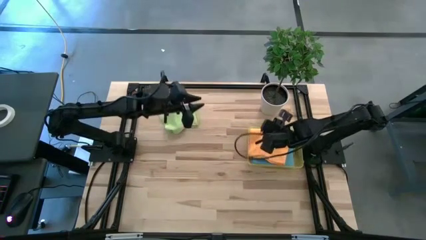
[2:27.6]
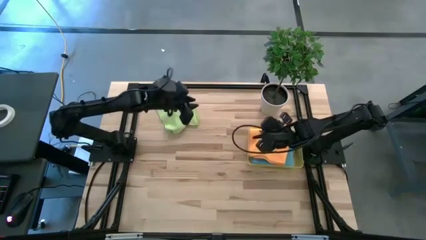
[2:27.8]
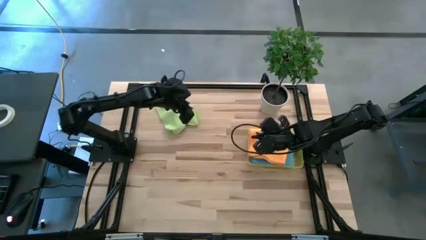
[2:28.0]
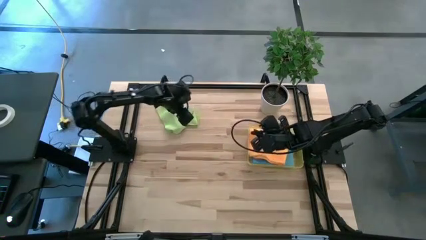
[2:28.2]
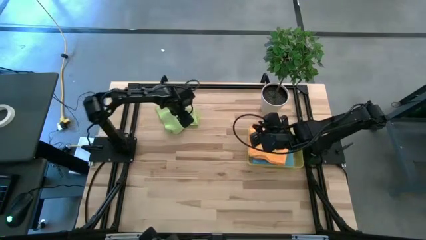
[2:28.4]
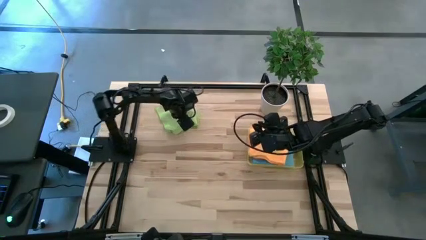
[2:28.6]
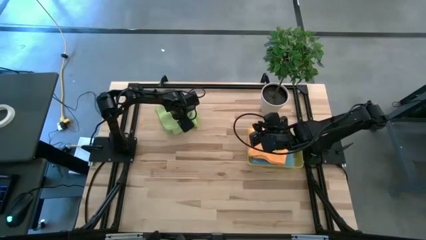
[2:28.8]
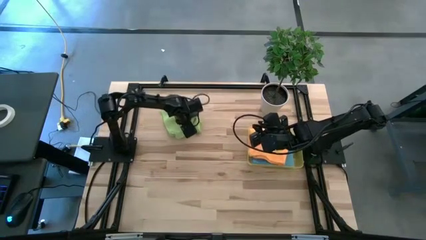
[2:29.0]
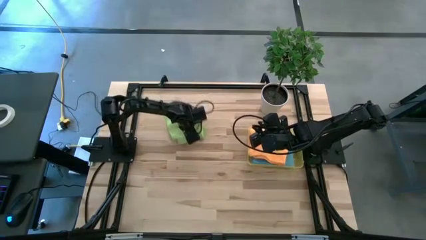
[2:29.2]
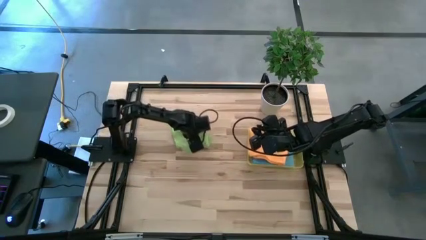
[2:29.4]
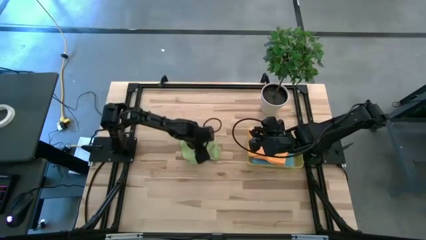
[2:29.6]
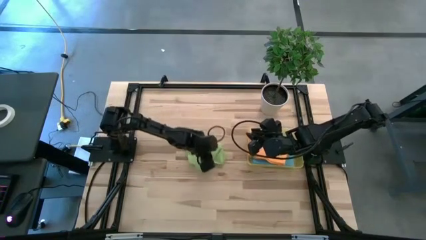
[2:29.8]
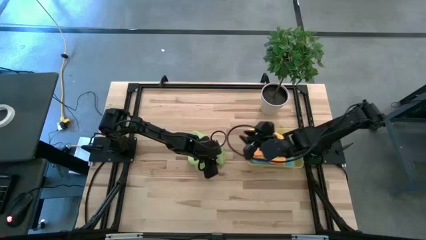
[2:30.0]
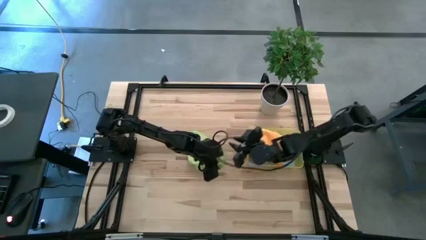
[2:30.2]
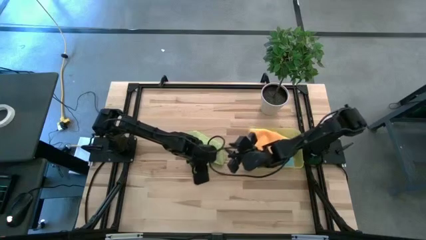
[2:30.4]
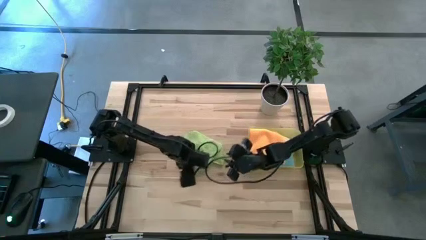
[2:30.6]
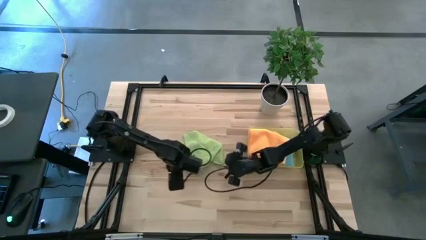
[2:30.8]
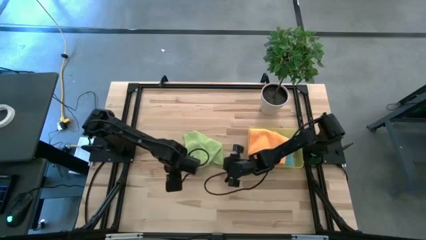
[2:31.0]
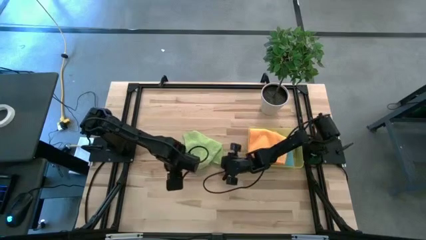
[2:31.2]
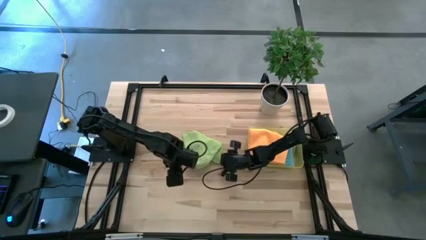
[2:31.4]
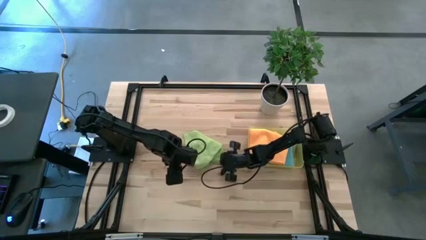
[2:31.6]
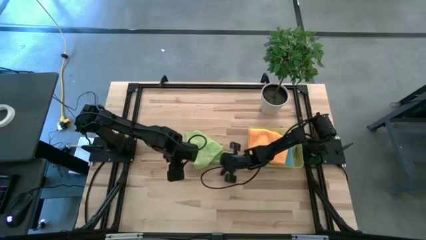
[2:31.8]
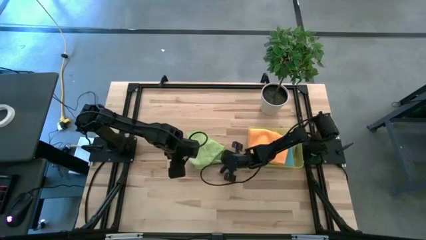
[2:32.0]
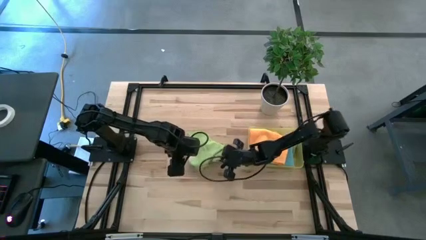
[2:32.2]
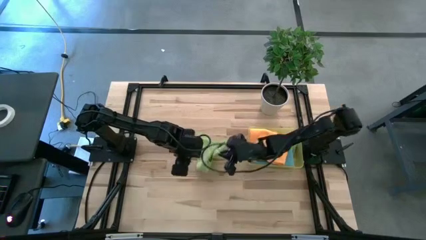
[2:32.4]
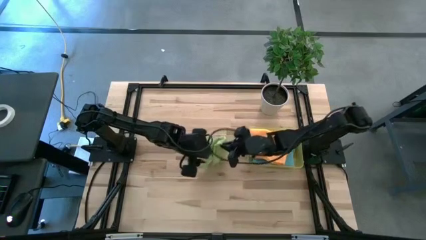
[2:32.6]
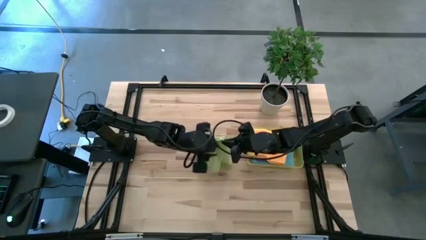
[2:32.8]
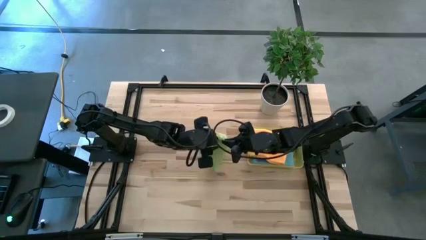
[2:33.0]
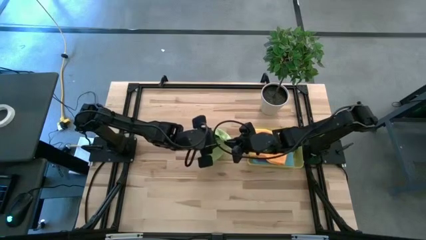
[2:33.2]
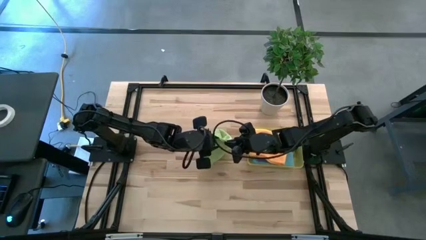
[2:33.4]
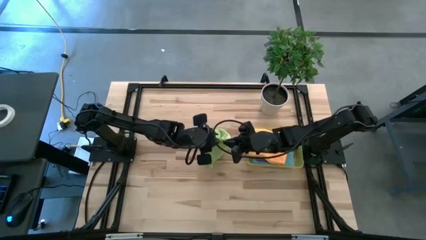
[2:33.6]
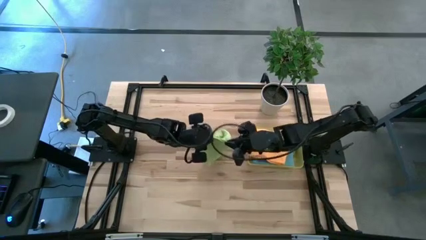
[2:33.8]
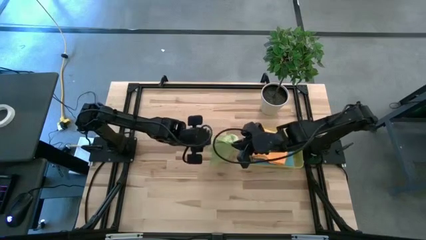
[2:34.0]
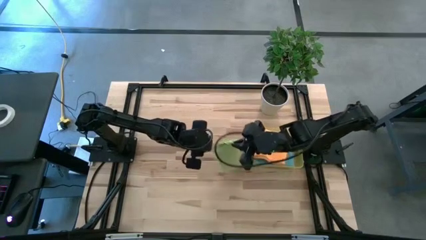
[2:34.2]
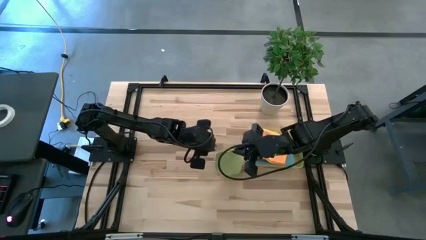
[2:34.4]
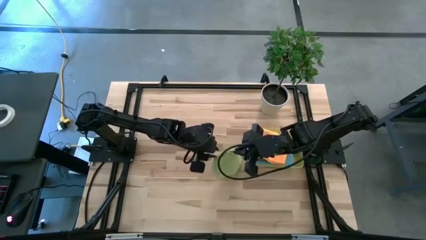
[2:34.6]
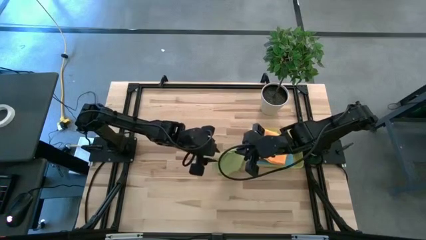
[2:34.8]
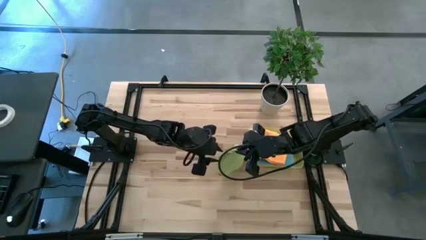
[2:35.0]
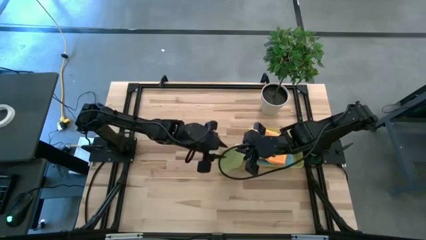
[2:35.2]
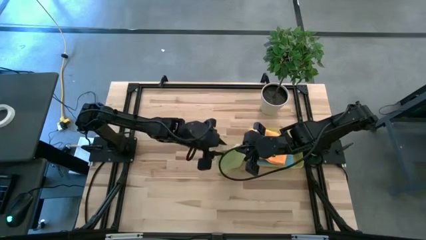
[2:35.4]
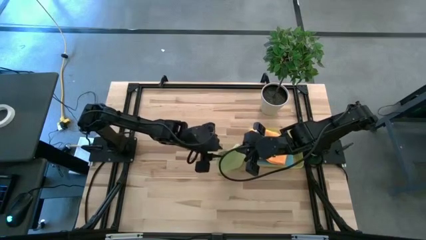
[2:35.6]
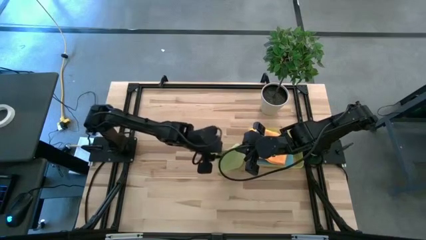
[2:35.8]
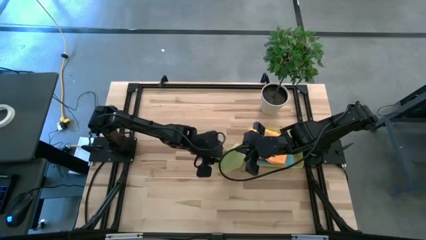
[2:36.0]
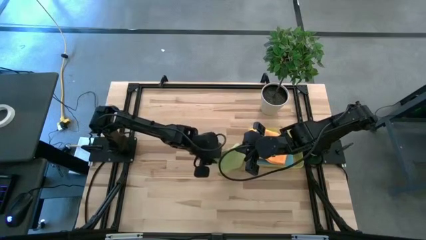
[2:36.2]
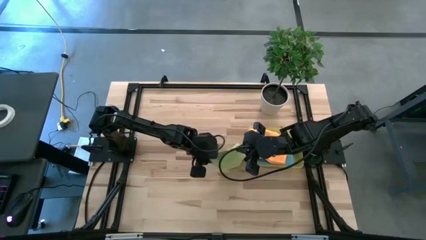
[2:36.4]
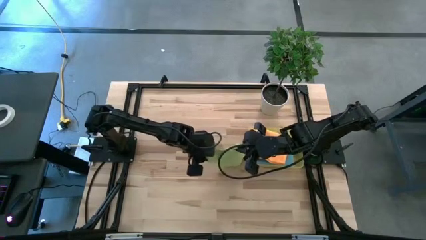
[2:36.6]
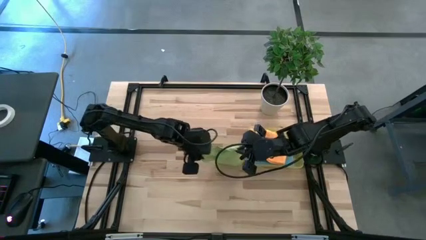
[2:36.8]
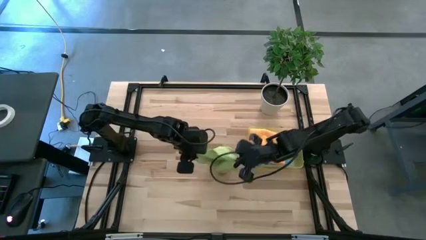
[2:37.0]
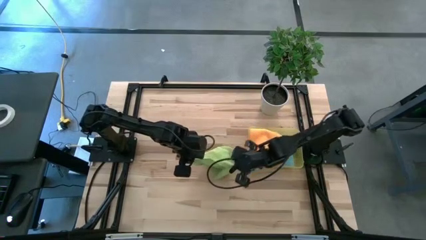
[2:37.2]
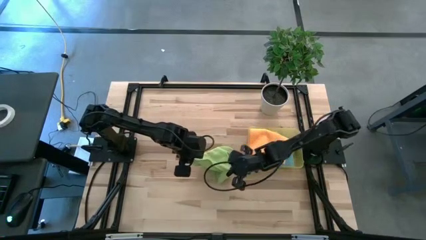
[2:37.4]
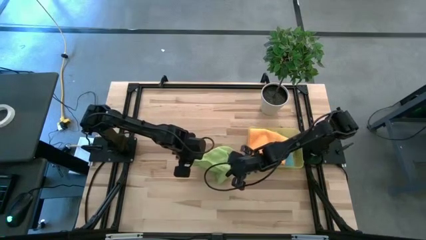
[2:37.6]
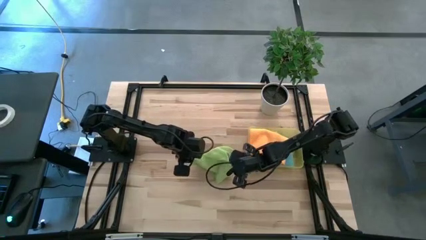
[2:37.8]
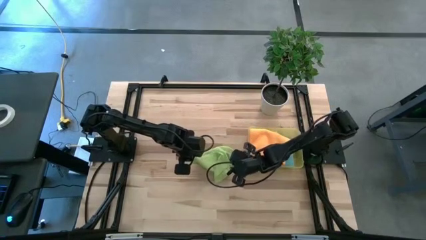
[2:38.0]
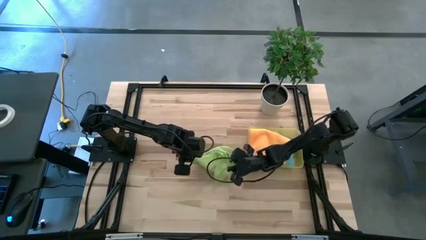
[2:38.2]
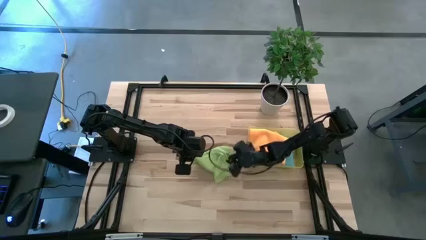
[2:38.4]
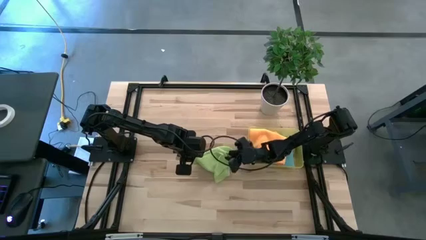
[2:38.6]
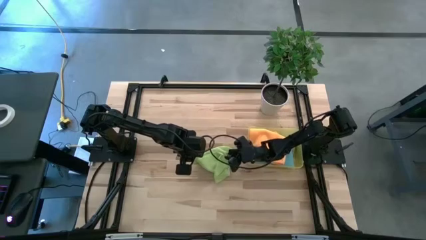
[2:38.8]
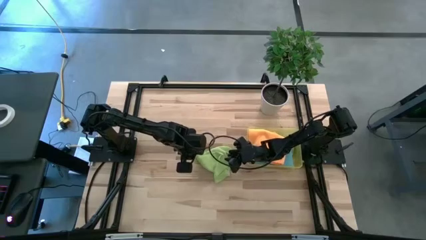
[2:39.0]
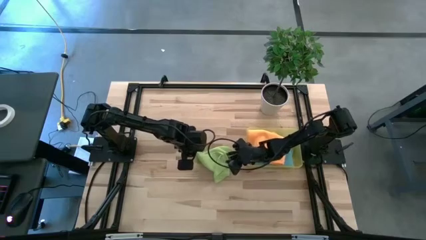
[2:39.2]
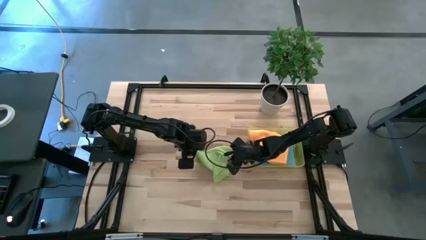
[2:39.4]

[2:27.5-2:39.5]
Task: Fold microfiber towels
Fold the green microfiber cloth
